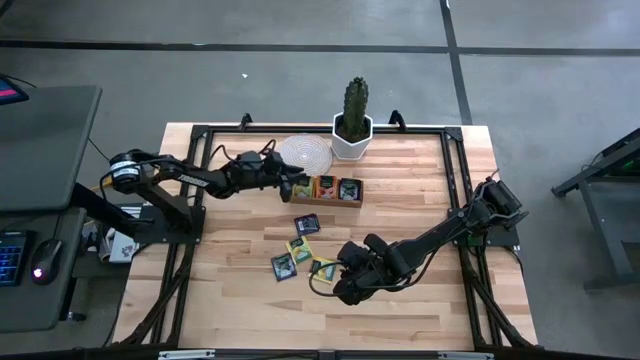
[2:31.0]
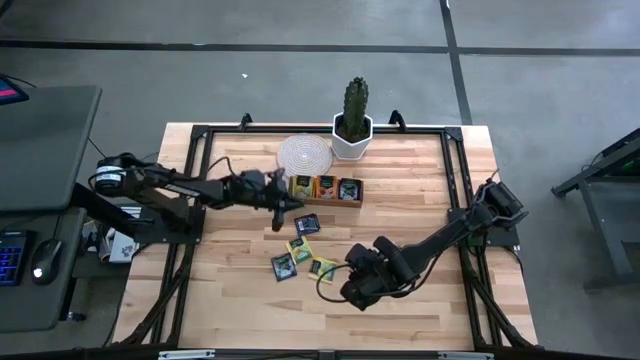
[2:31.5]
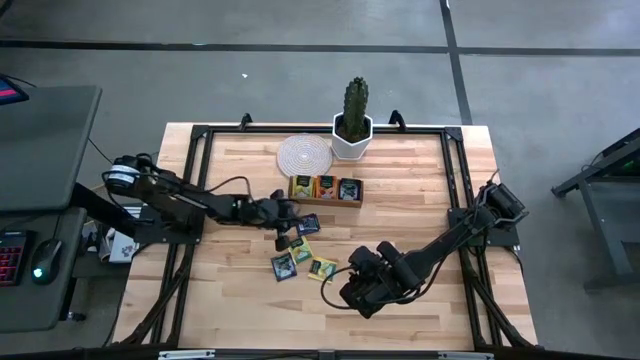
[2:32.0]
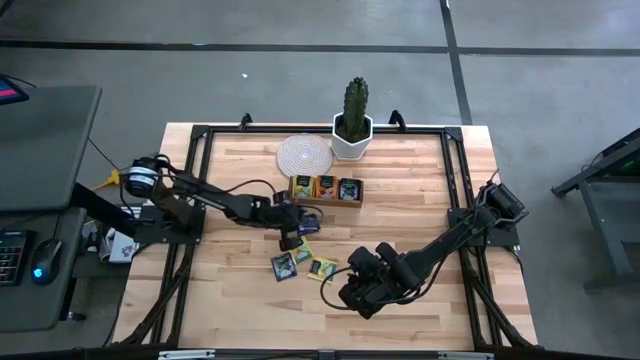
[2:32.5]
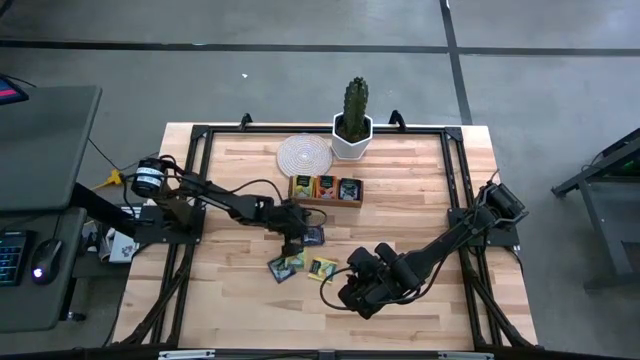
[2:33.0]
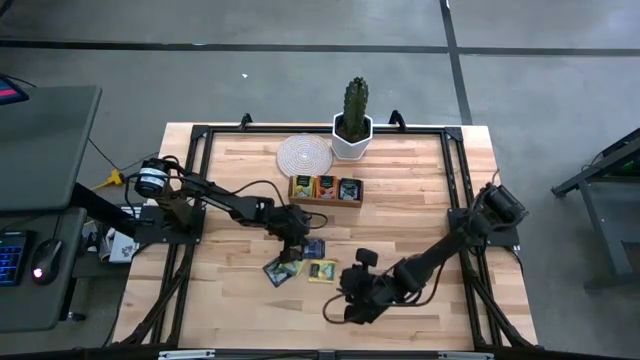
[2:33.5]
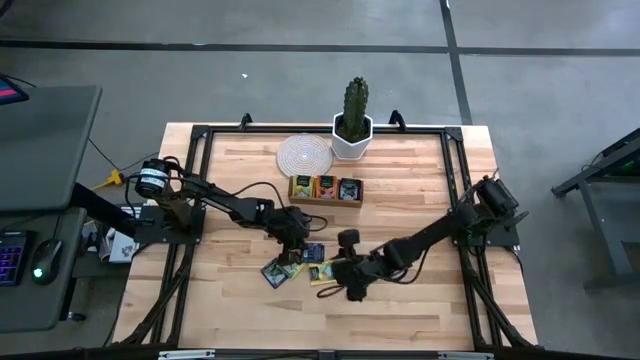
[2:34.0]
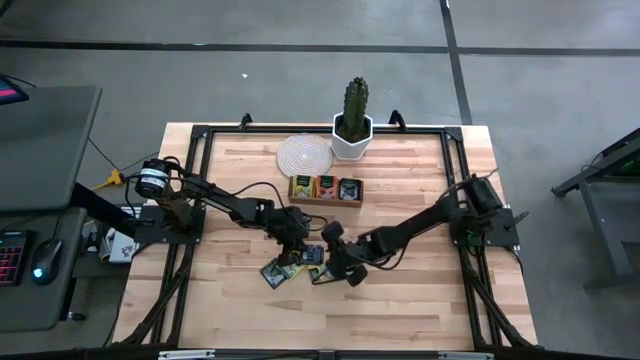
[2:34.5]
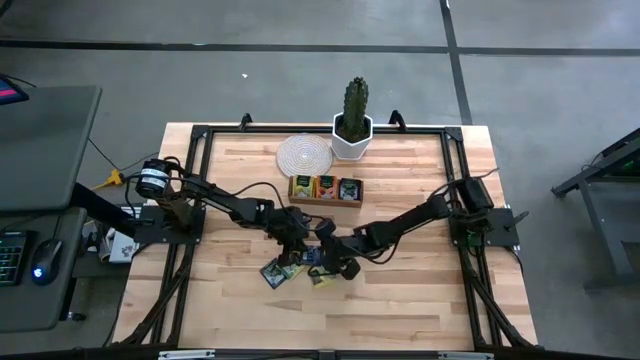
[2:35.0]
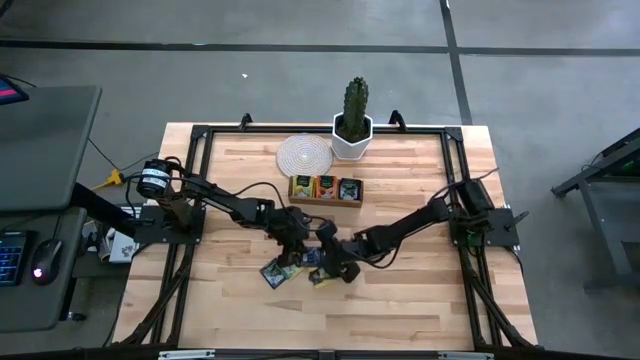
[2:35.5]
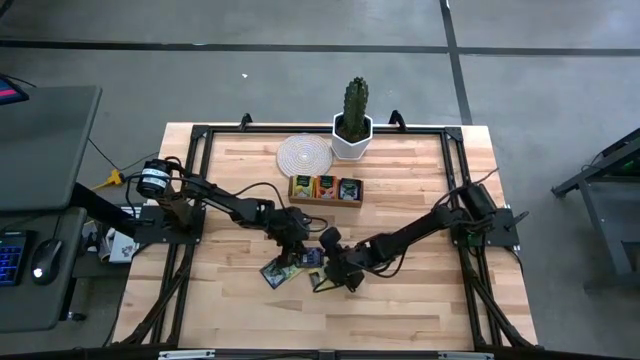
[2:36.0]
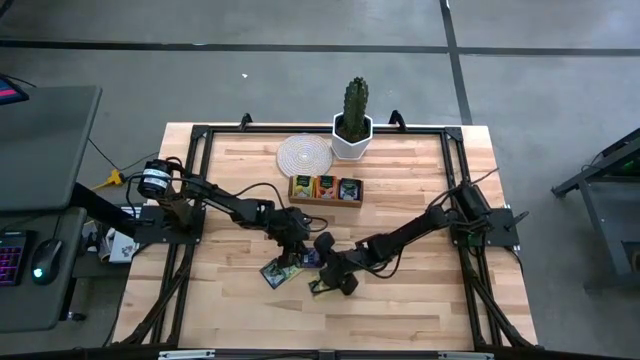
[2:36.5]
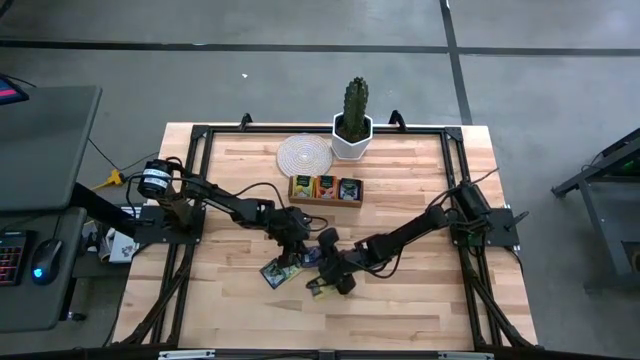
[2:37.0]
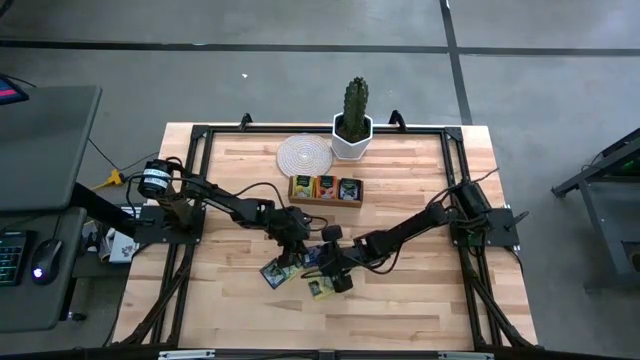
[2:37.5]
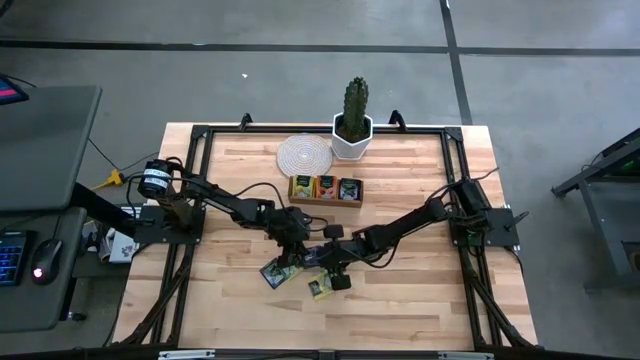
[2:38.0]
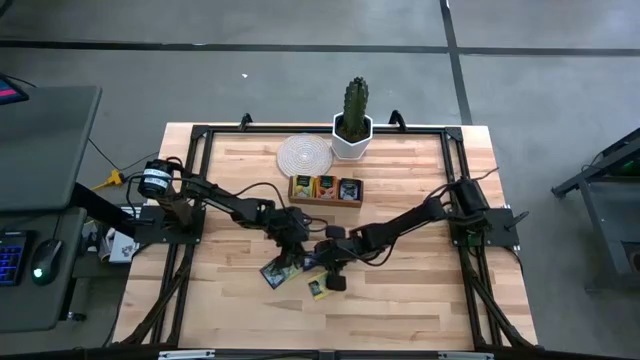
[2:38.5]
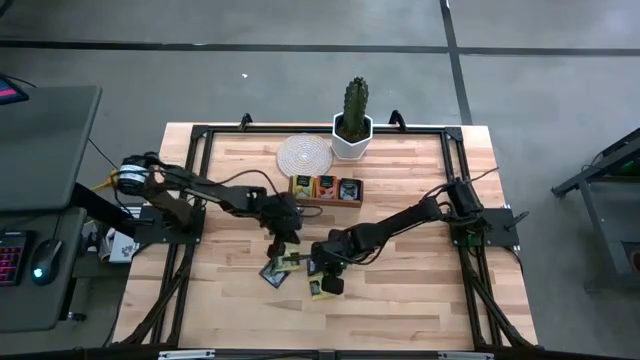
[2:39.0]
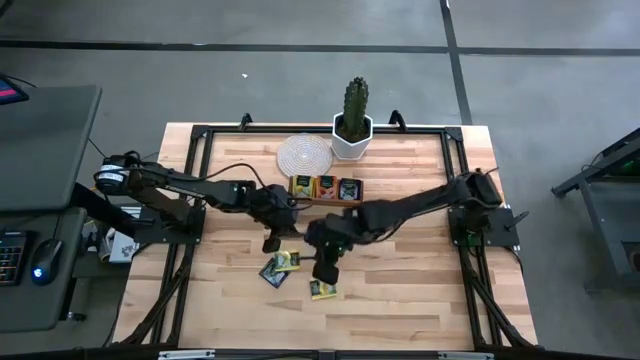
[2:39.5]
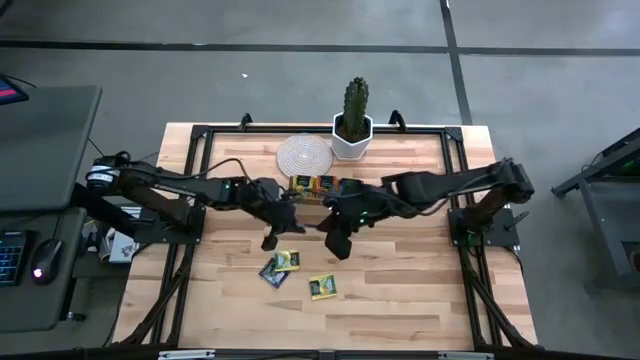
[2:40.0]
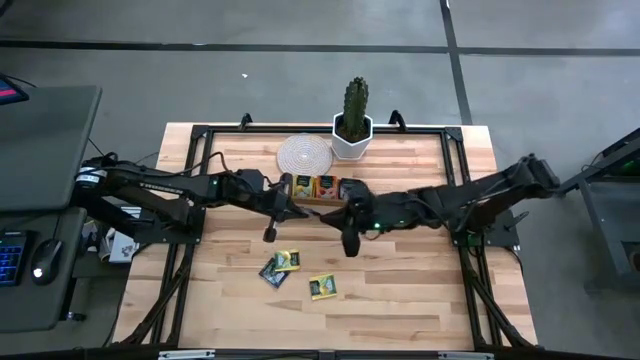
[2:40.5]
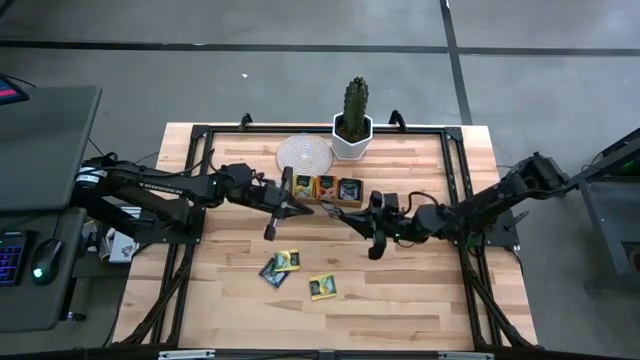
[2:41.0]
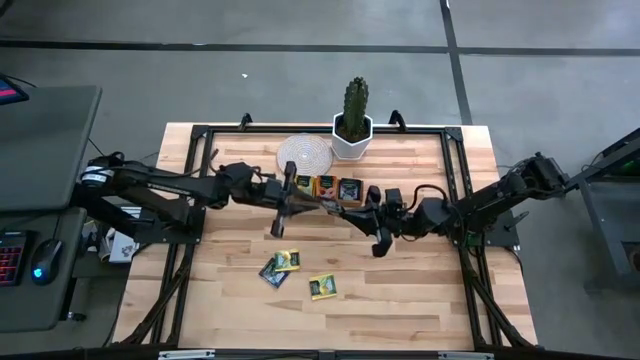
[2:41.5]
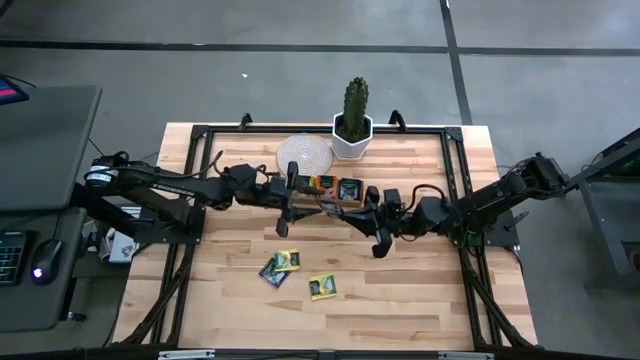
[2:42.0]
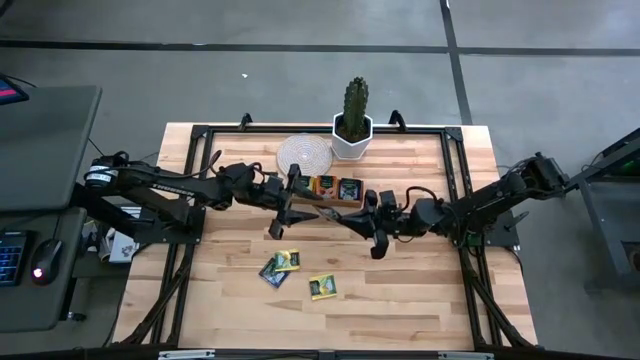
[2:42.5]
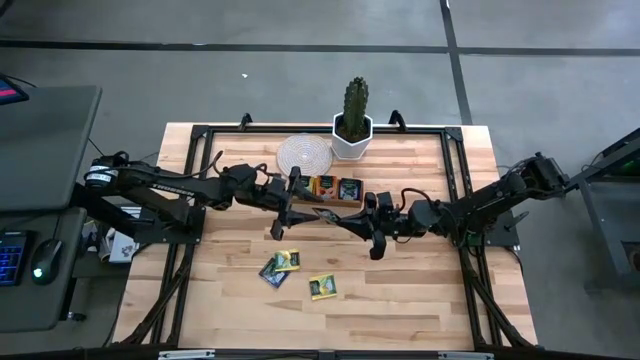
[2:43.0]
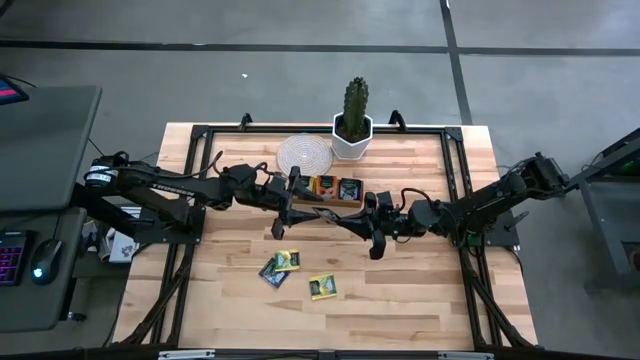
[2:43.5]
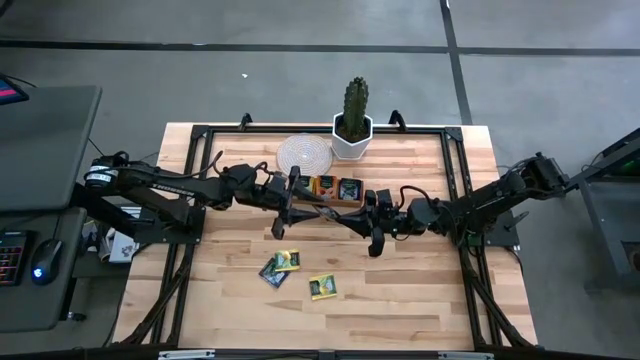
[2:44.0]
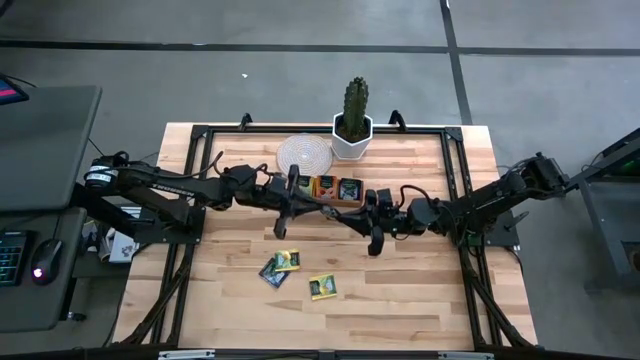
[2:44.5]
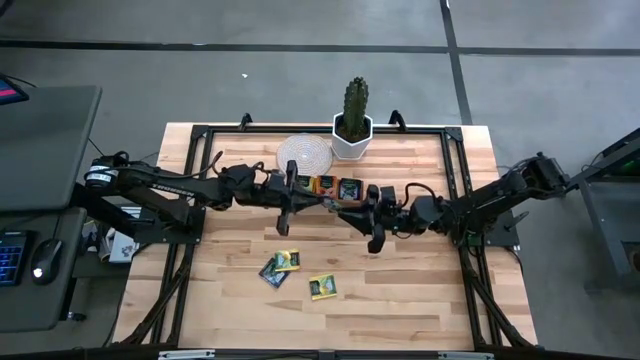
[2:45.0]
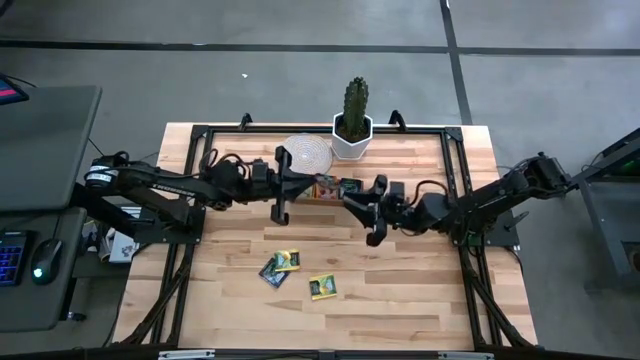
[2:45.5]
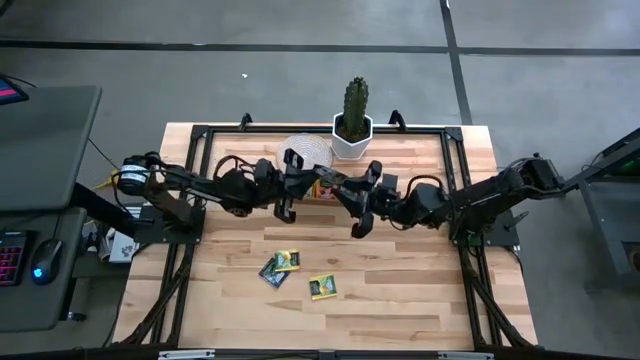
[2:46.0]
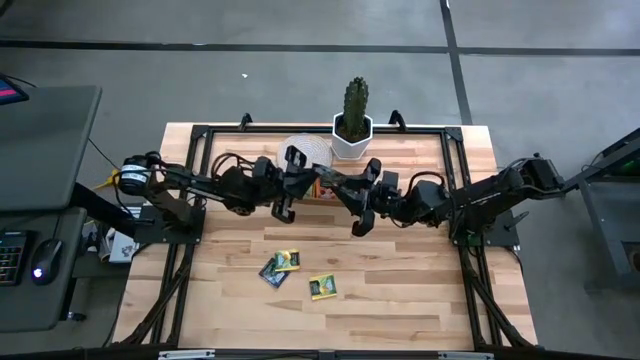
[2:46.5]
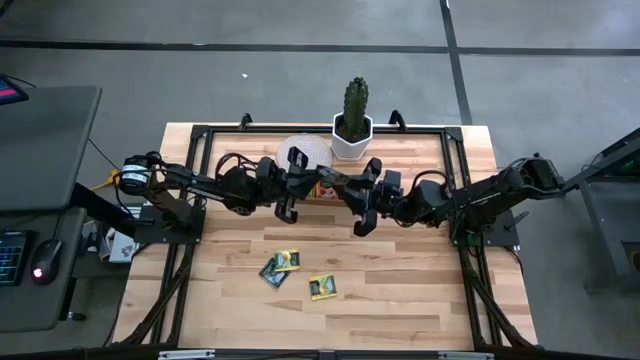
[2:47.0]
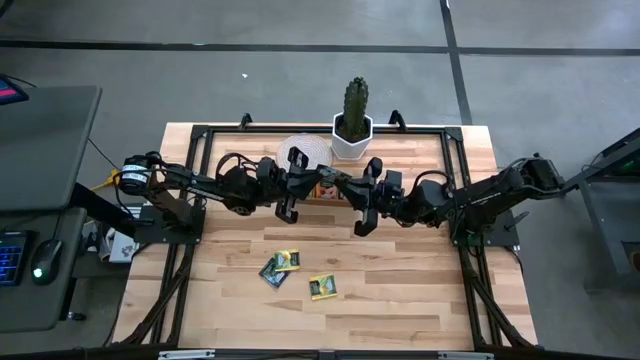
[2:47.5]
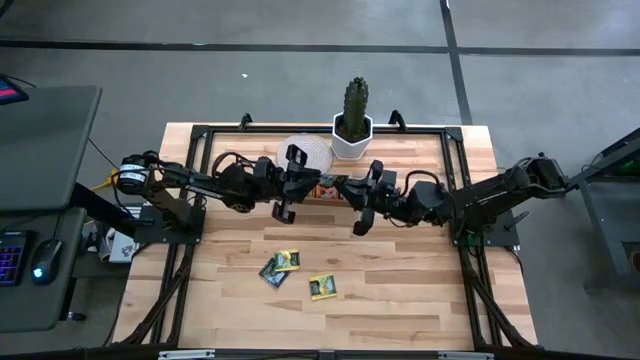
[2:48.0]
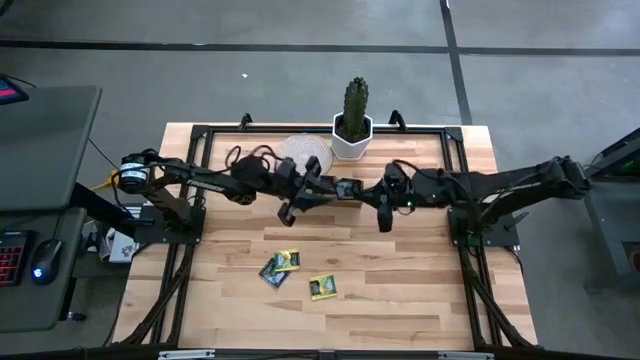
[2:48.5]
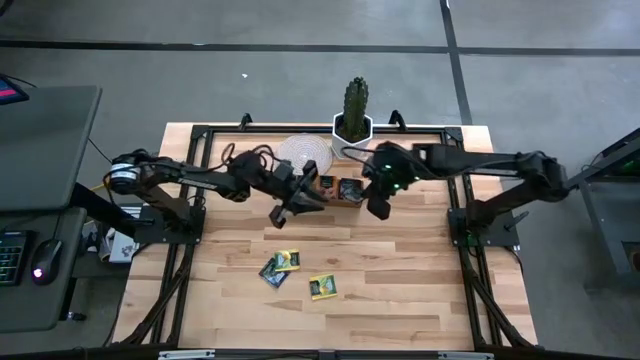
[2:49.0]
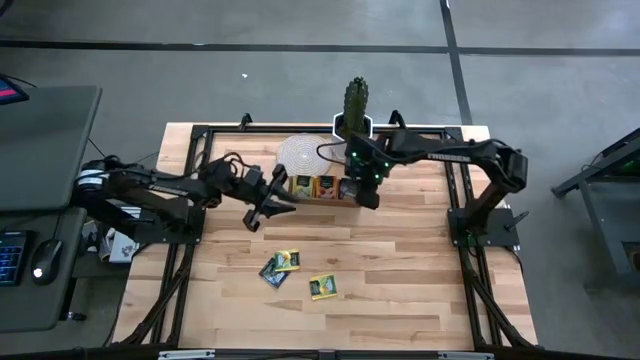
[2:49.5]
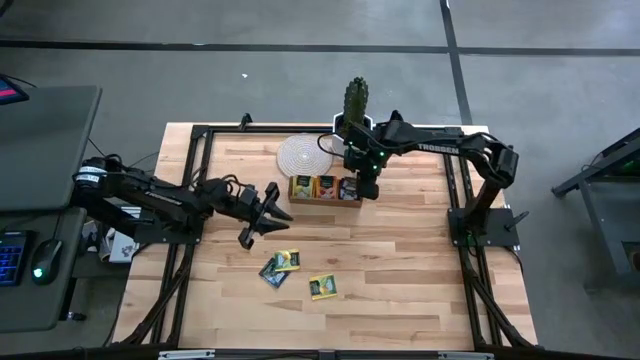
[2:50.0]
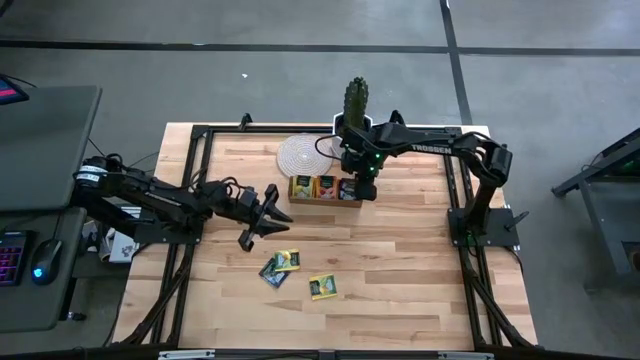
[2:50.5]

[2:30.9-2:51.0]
Task: Pick & Place Tea
Put the purple tea bag into the right section of the wooden organizer

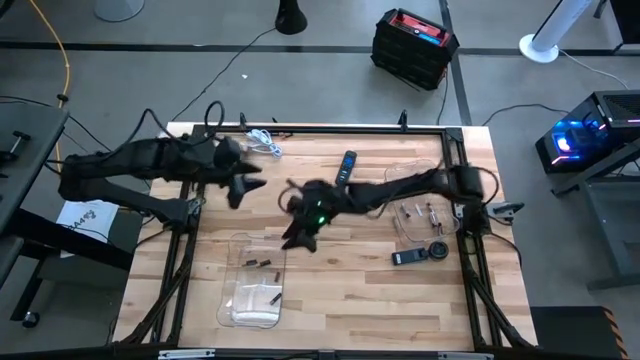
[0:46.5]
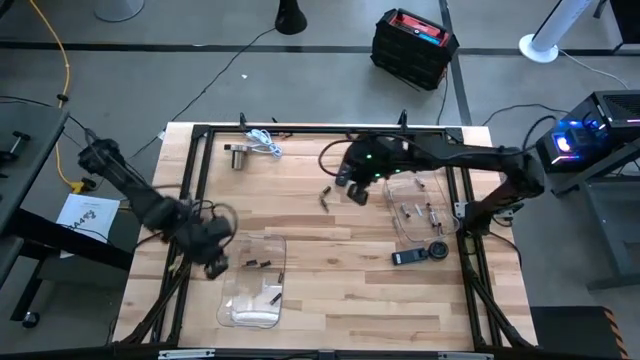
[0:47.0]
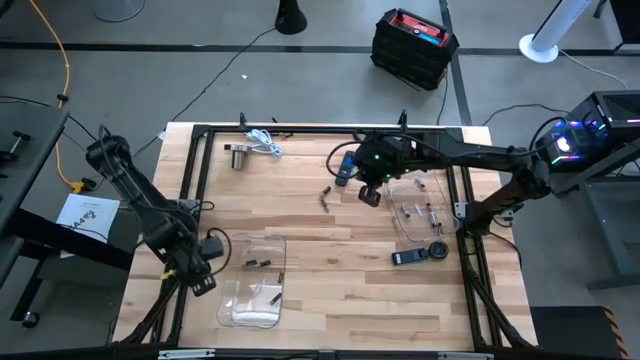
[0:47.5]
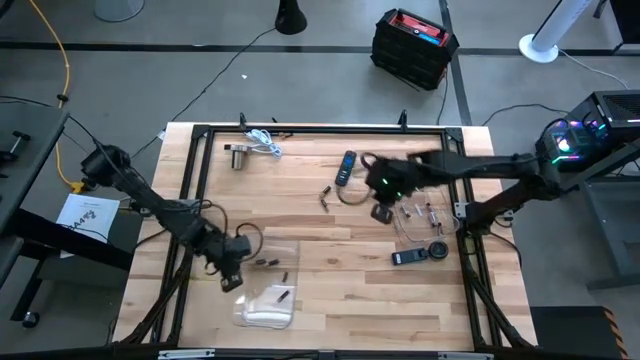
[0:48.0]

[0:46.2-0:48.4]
Task: Sort batteries
Adjust the left transparent bin
